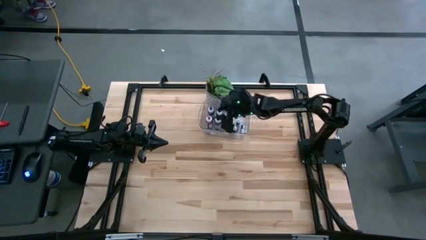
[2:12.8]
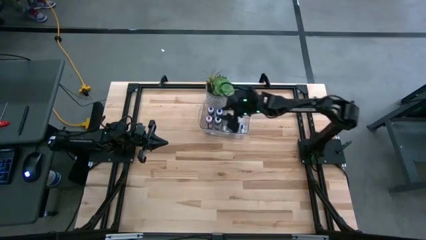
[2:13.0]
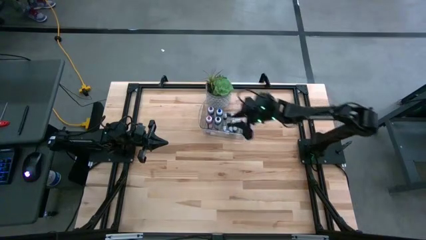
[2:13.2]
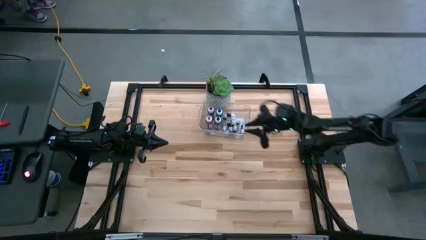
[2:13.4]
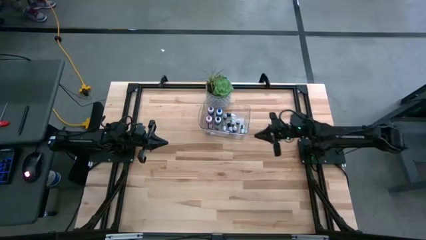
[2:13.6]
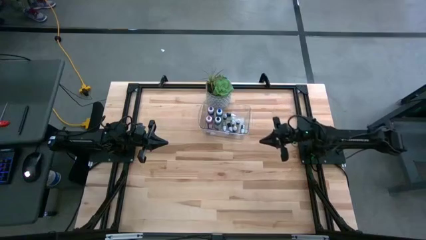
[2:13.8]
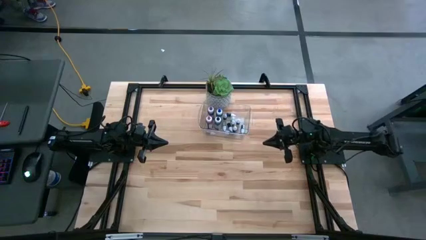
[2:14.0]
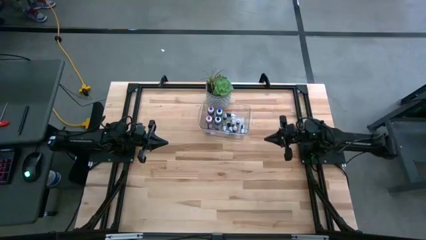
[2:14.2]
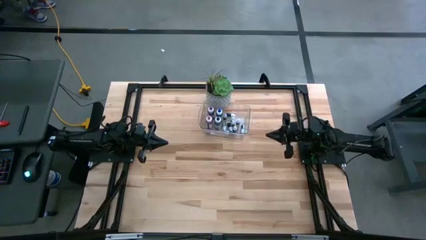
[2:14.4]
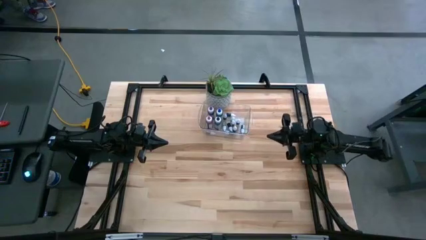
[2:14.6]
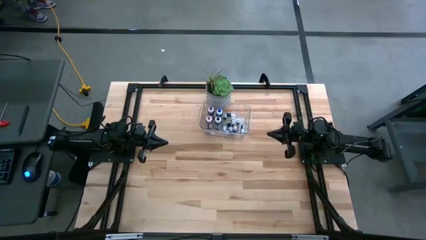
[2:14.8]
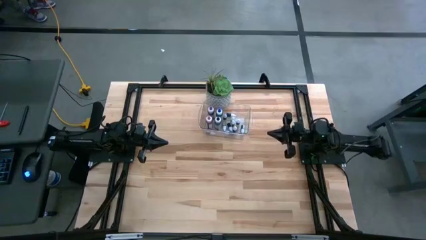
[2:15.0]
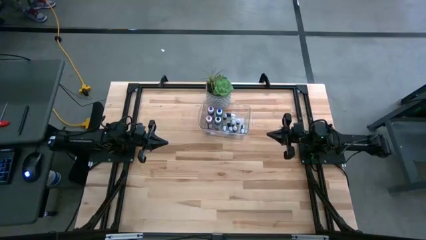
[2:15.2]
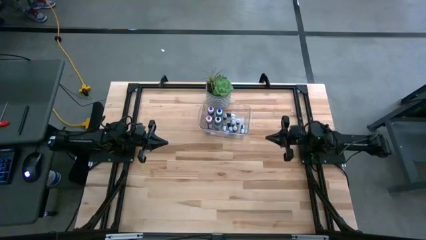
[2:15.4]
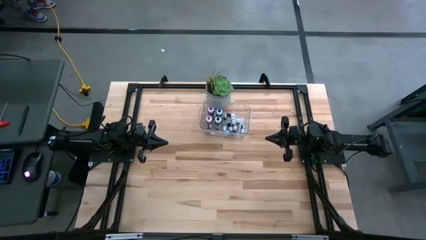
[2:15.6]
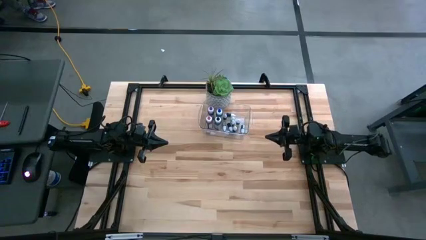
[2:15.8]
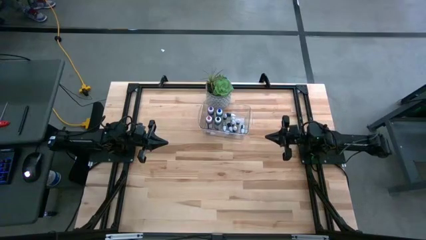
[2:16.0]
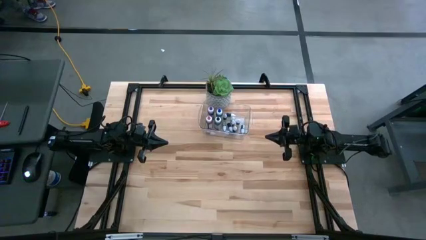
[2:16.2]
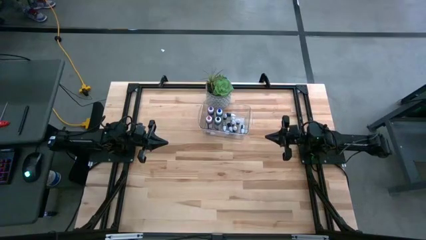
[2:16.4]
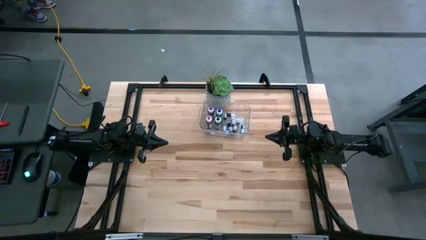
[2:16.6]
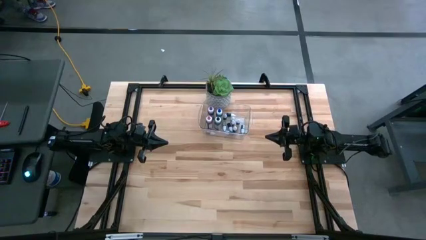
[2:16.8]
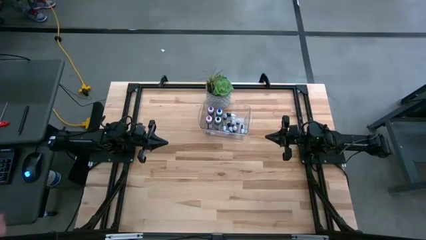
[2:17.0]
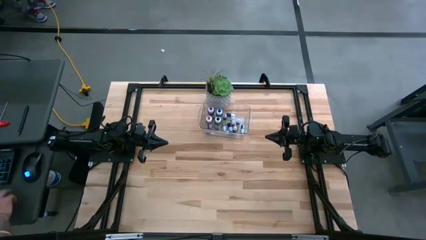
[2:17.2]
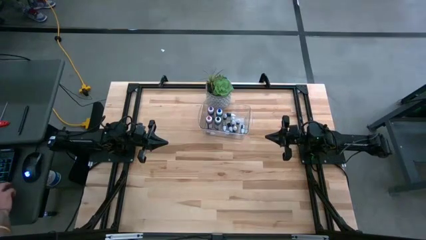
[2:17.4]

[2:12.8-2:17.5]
Task: Pick & Place food coloring
Return to Home Position

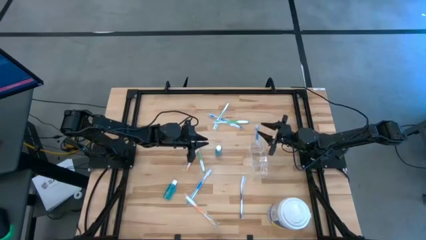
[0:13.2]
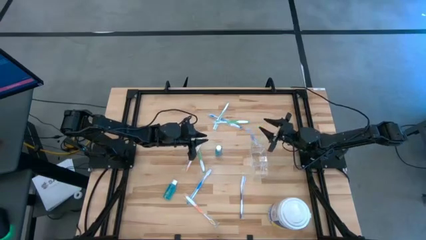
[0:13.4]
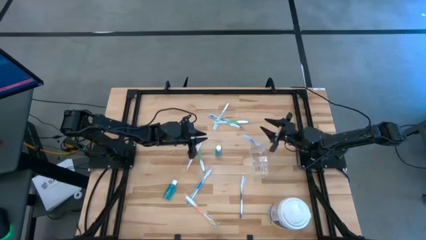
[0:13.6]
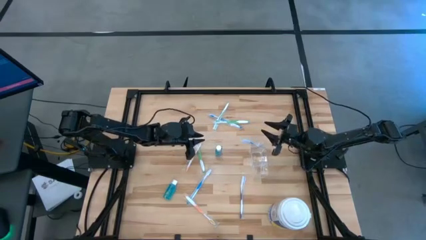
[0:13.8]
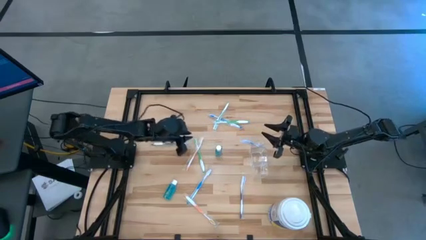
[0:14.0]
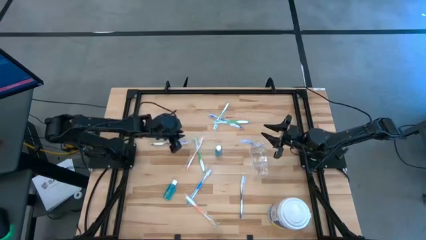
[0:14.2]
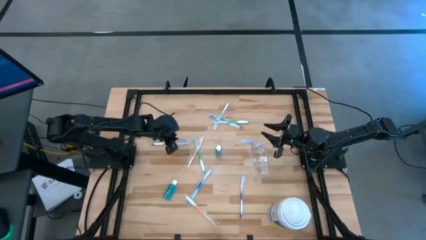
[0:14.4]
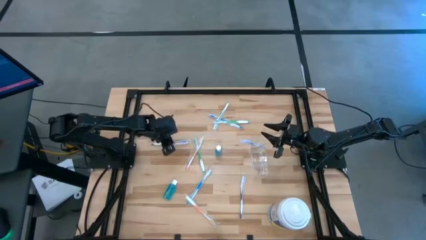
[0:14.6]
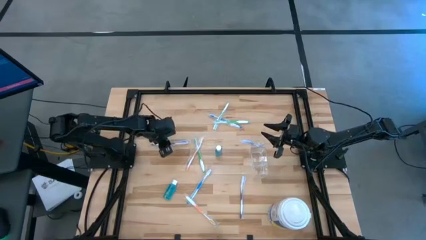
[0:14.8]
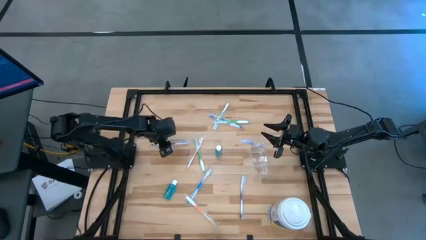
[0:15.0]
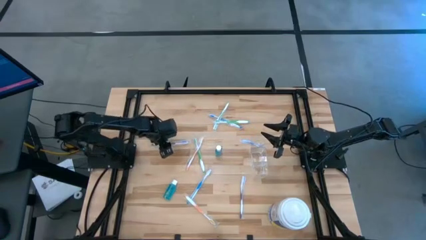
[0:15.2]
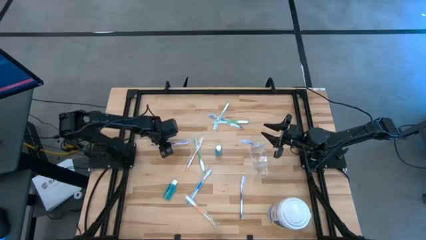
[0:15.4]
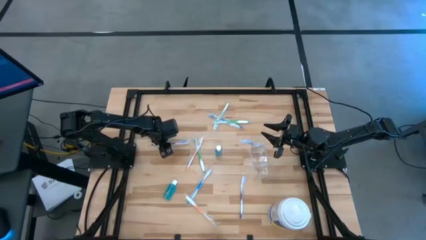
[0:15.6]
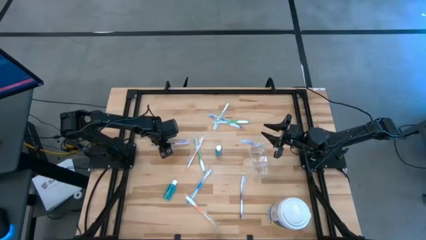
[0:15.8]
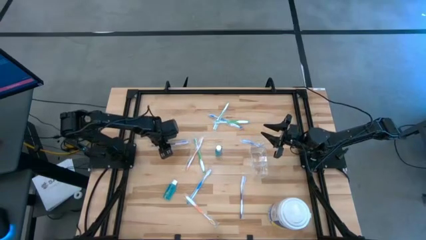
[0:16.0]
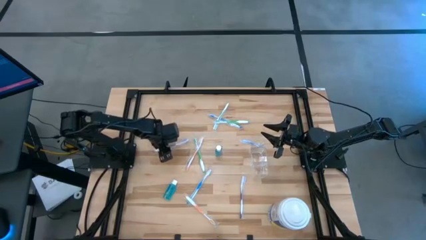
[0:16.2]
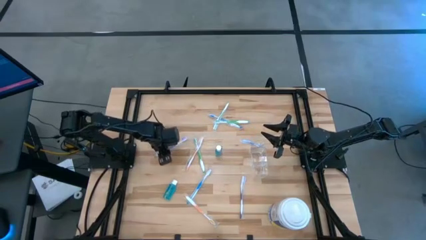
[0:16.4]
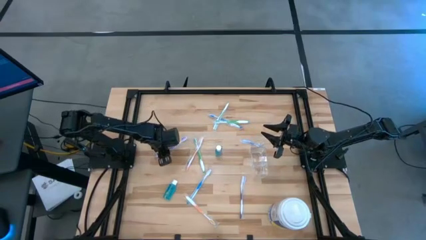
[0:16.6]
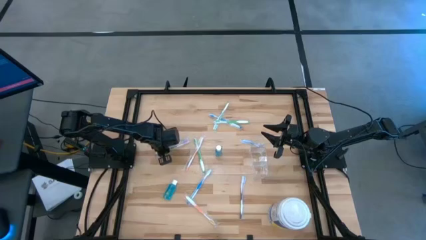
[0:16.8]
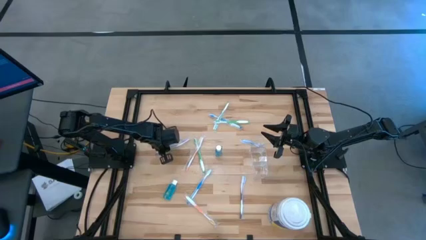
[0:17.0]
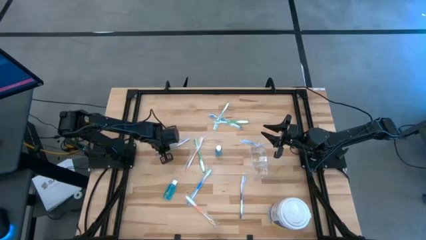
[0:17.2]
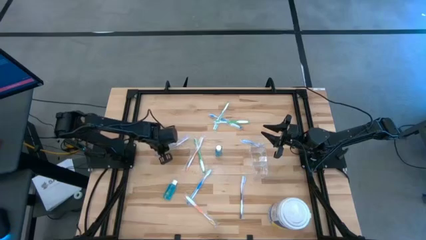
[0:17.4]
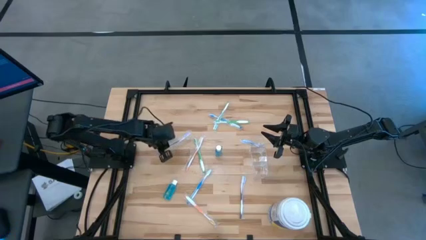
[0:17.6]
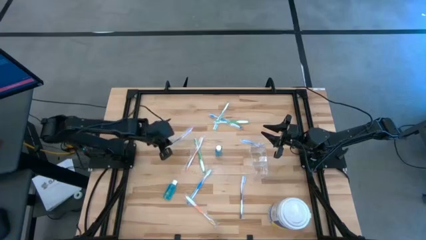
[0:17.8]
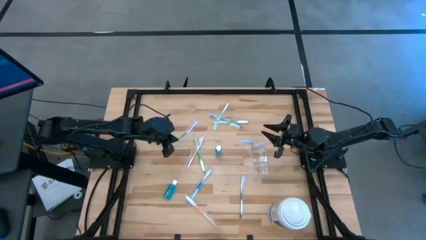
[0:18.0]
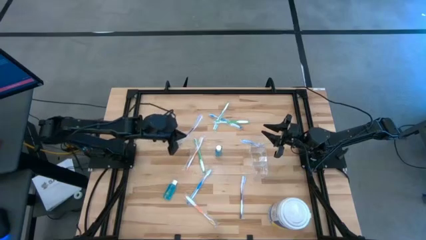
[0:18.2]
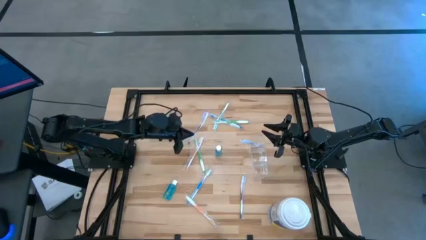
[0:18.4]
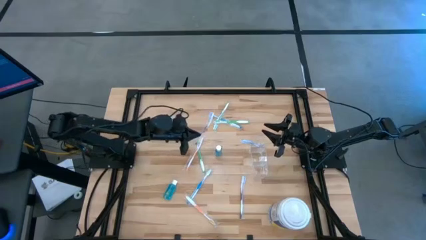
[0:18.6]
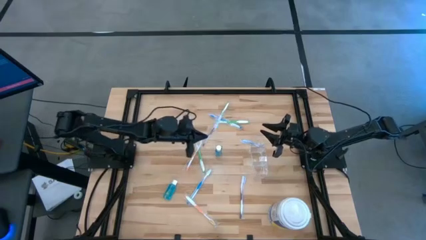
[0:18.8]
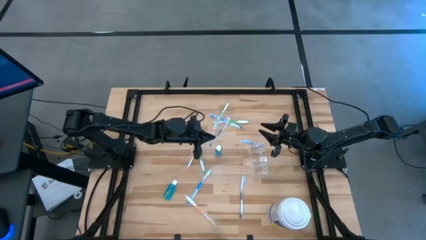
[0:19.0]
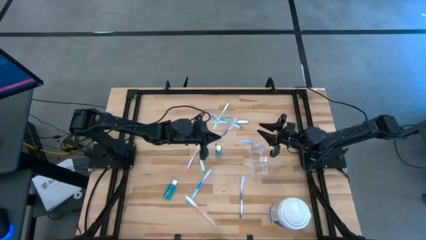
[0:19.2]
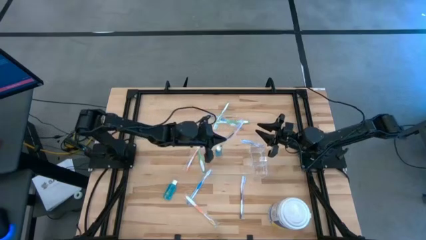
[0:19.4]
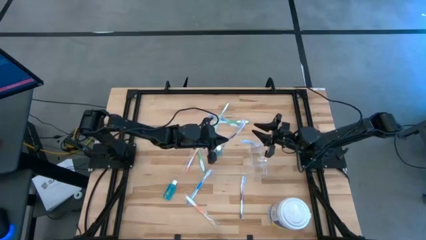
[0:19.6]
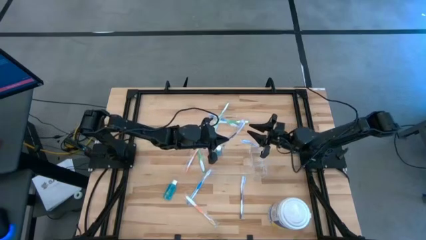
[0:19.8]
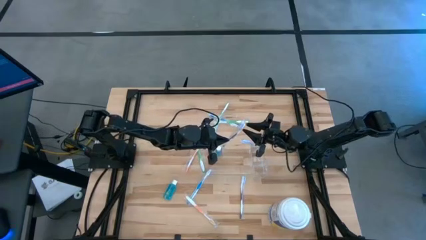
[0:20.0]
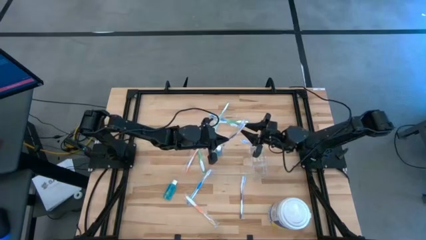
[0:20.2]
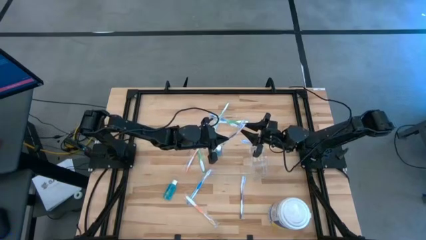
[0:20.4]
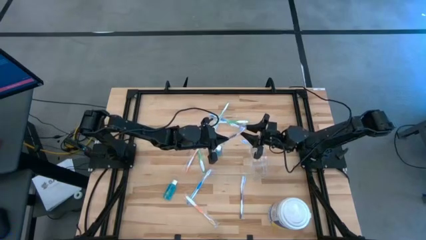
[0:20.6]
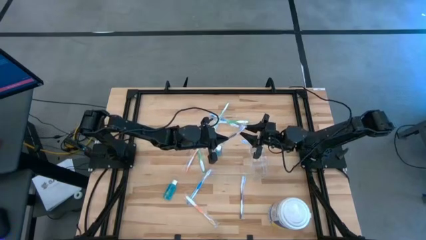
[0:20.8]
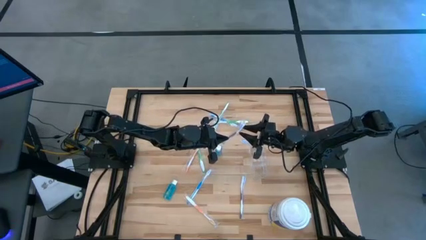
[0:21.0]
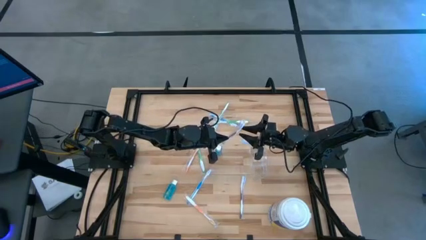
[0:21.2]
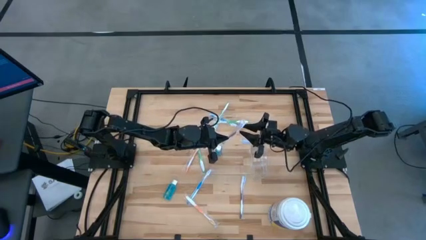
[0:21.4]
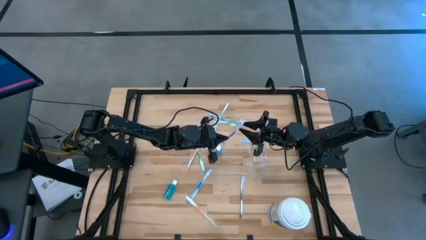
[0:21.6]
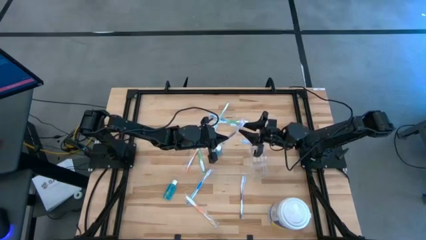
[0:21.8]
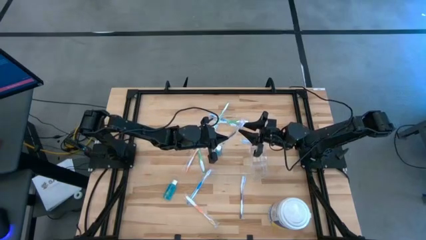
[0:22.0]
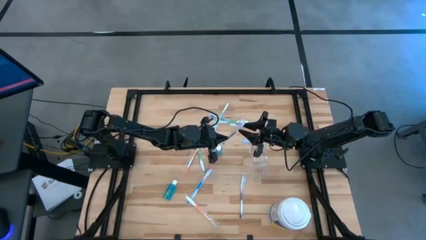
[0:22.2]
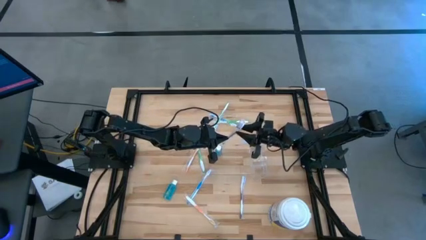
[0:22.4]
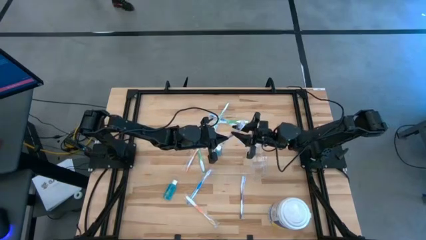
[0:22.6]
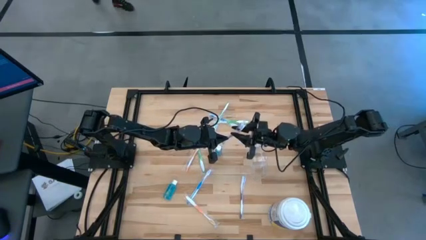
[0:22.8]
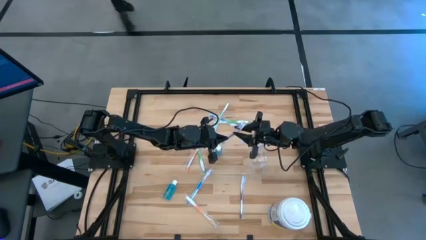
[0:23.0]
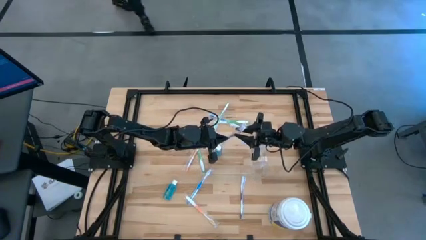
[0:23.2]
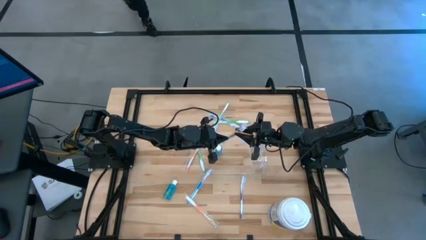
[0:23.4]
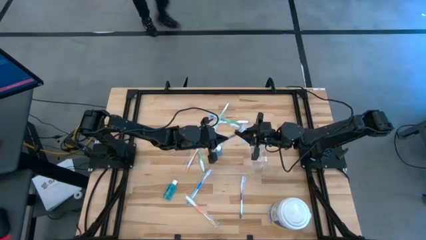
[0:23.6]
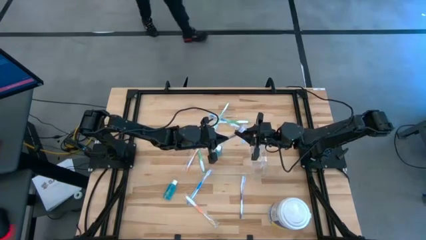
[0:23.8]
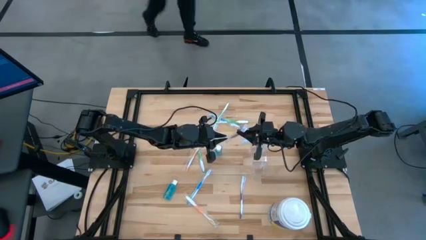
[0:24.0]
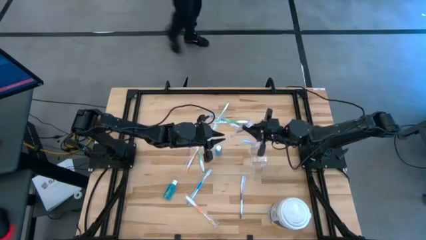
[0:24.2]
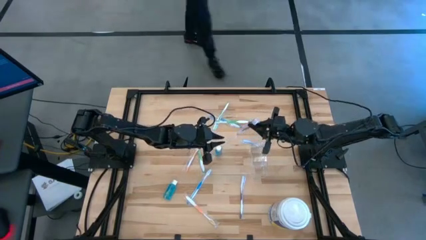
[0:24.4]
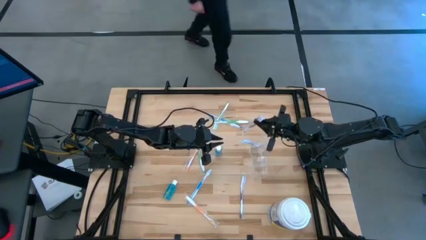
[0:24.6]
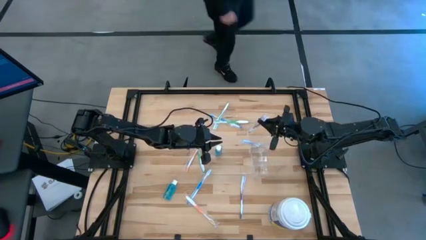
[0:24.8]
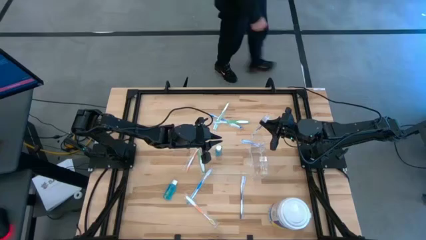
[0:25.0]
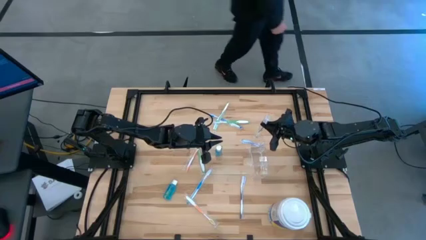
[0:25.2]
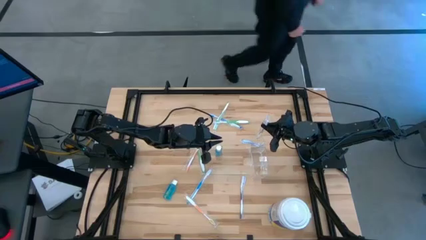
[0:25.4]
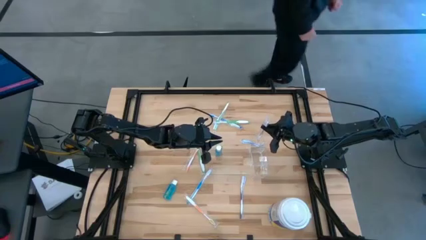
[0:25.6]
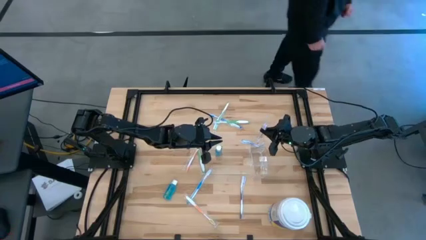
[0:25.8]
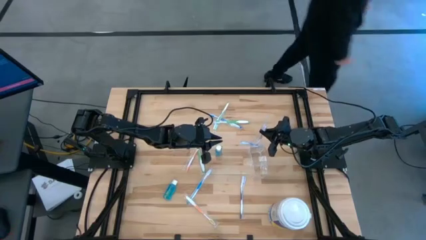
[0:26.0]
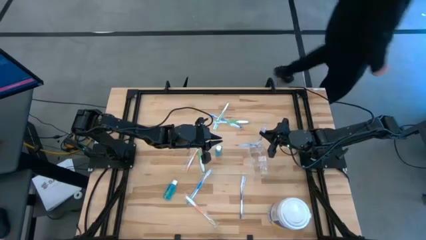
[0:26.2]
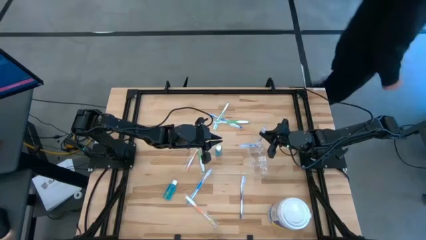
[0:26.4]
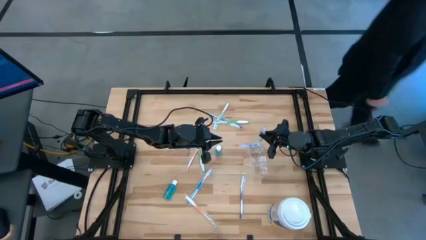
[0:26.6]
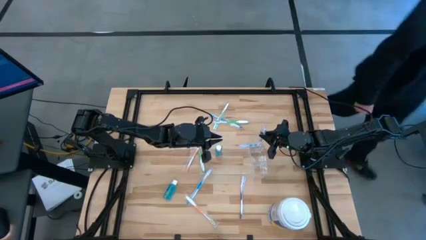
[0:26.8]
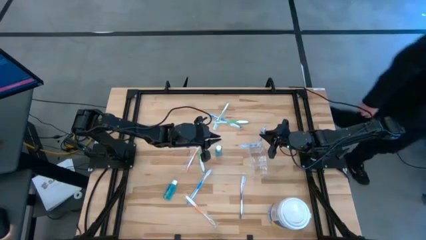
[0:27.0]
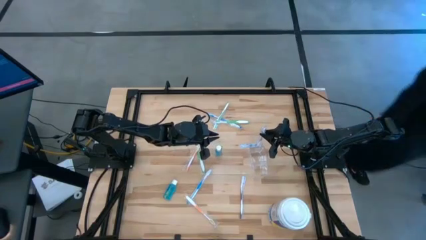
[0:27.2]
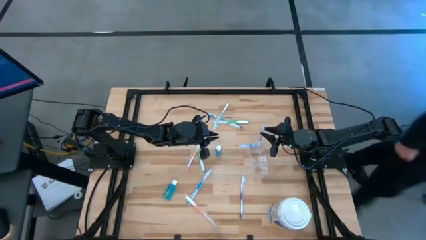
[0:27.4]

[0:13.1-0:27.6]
Task: Pick & Place toothbrushing station
Put the top purple toothbrush into the the transparent organizer
